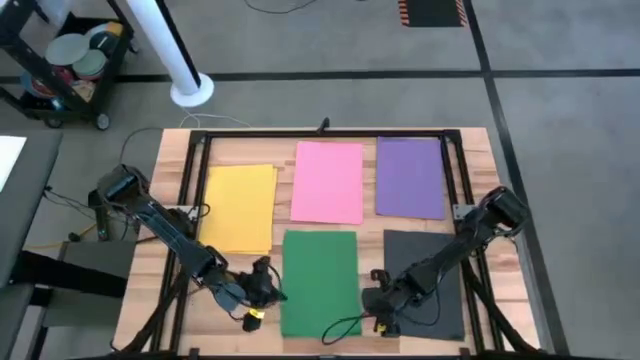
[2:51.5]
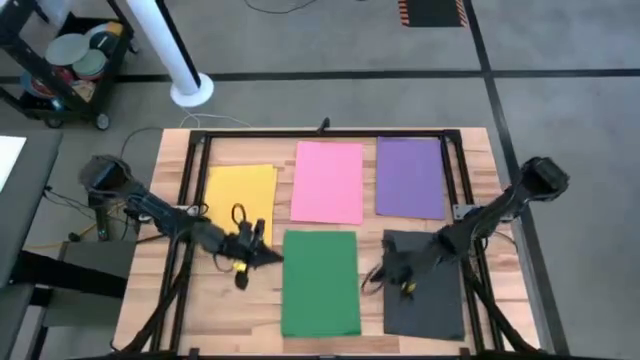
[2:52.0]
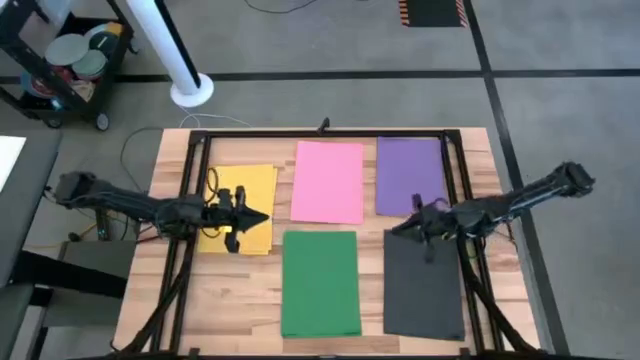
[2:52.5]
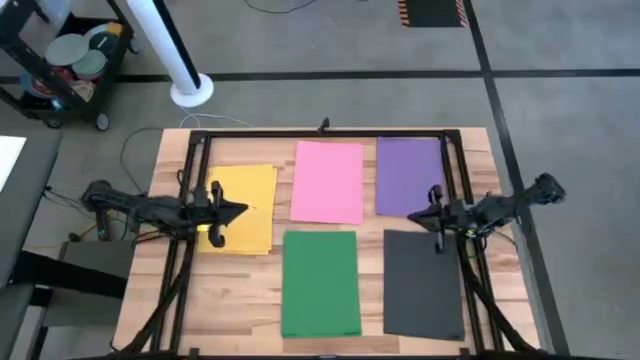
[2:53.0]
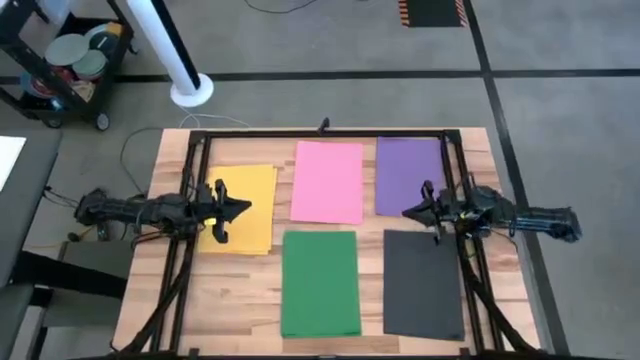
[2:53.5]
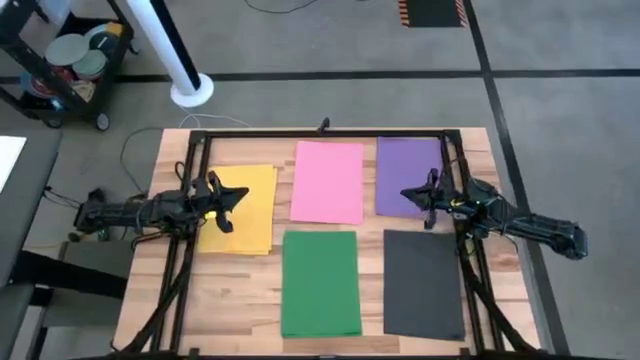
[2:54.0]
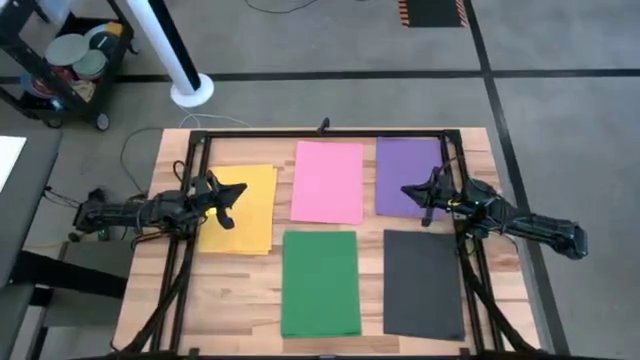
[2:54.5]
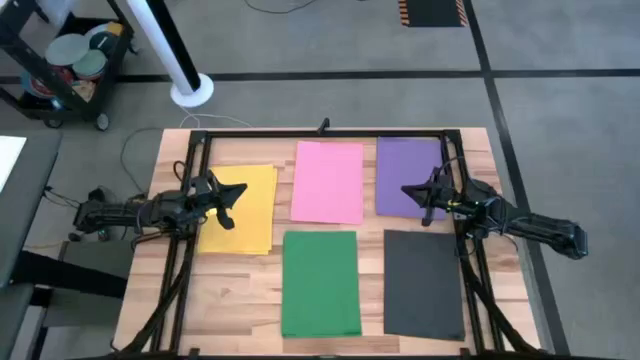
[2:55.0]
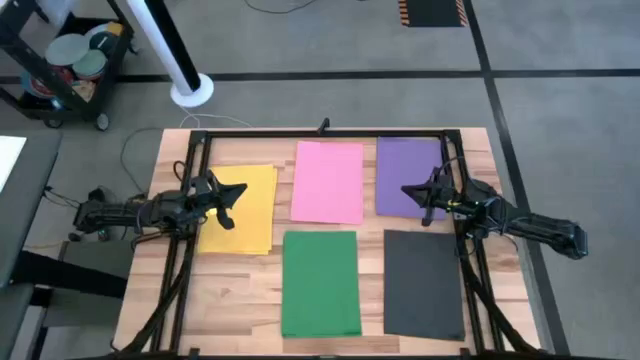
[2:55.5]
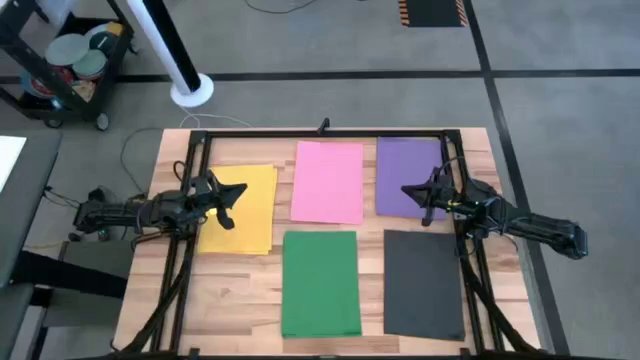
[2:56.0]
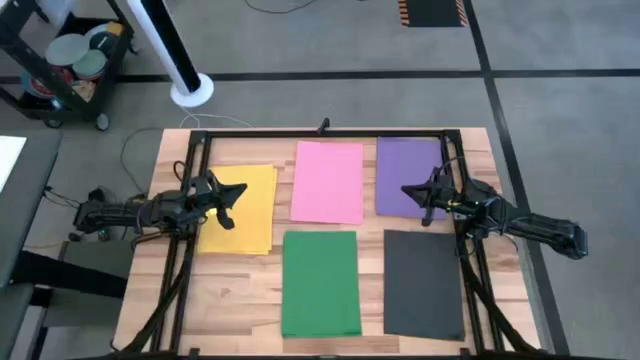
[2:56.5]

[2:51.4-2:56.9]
Task: Organize paper
Return to Home Position

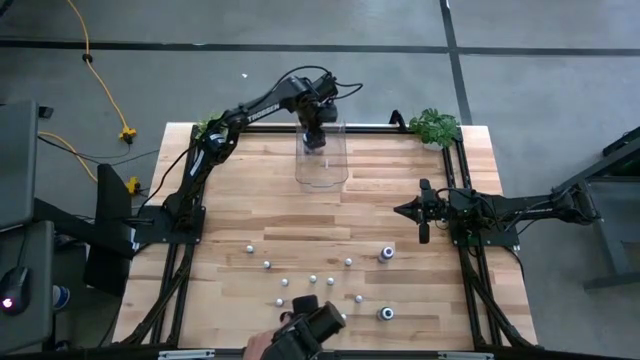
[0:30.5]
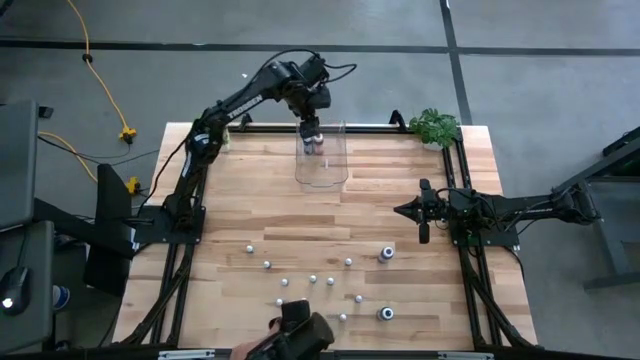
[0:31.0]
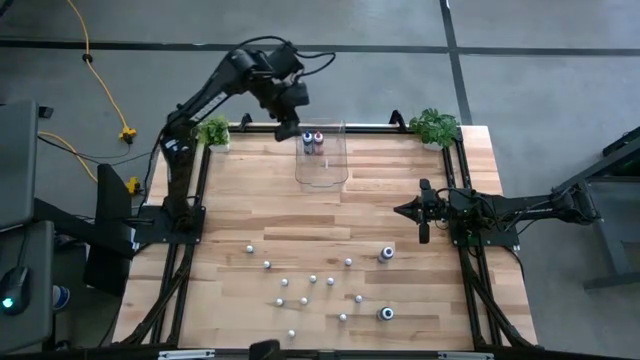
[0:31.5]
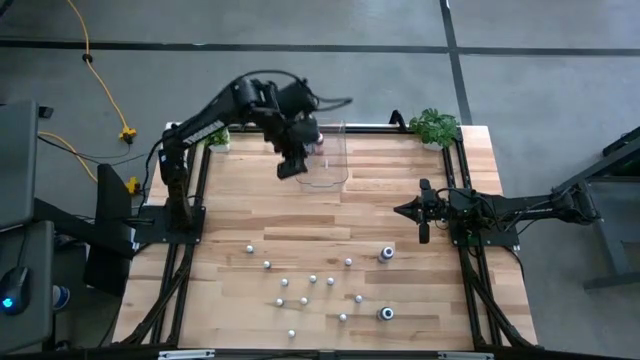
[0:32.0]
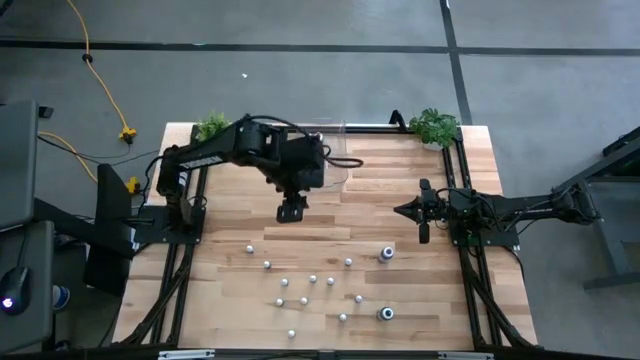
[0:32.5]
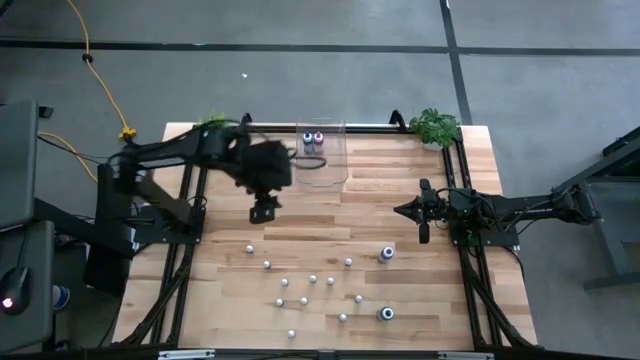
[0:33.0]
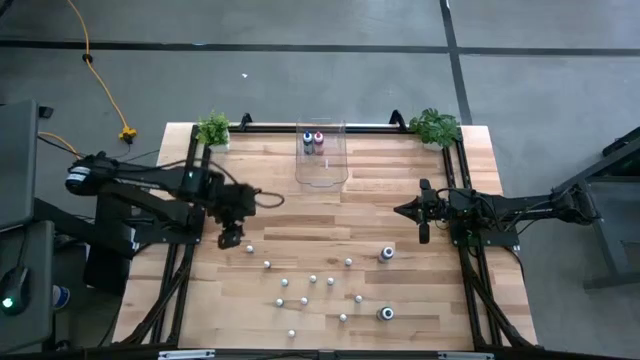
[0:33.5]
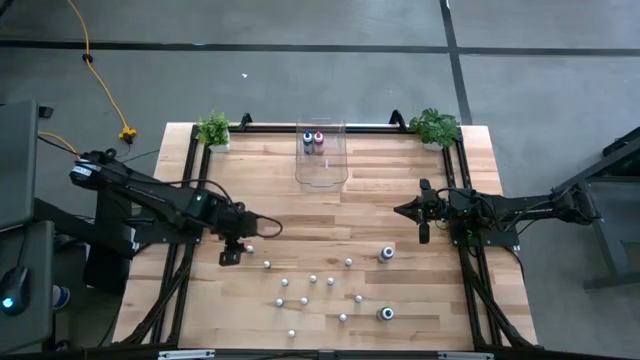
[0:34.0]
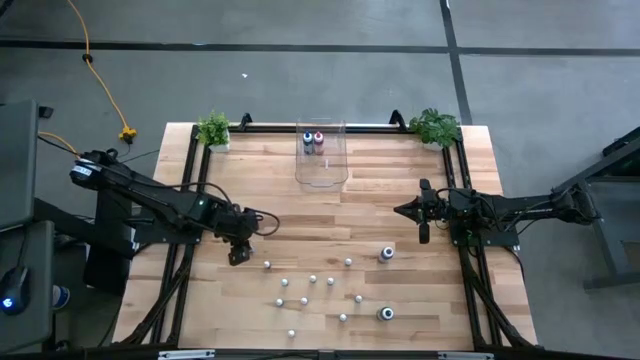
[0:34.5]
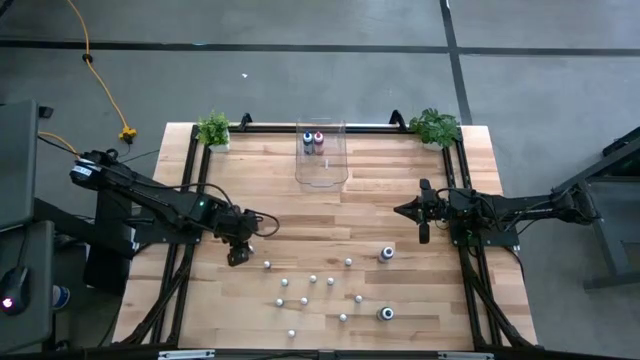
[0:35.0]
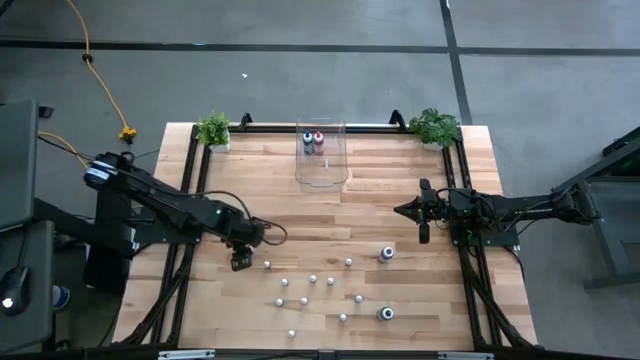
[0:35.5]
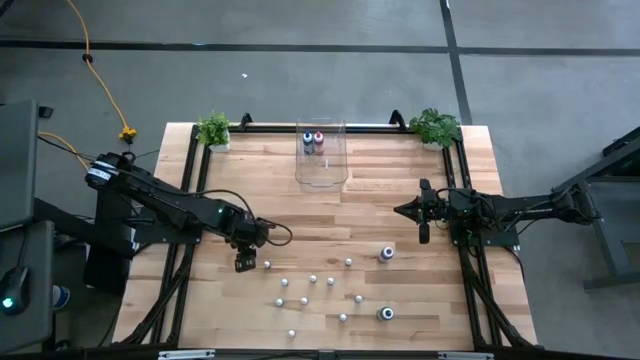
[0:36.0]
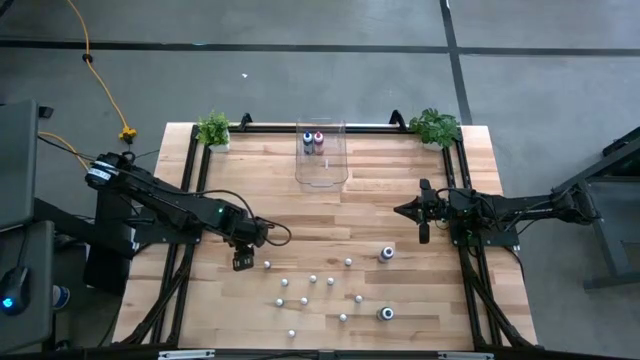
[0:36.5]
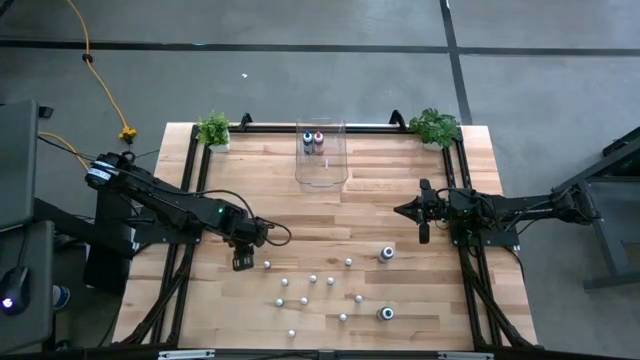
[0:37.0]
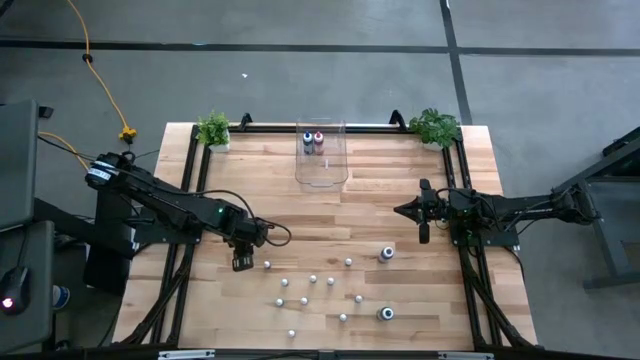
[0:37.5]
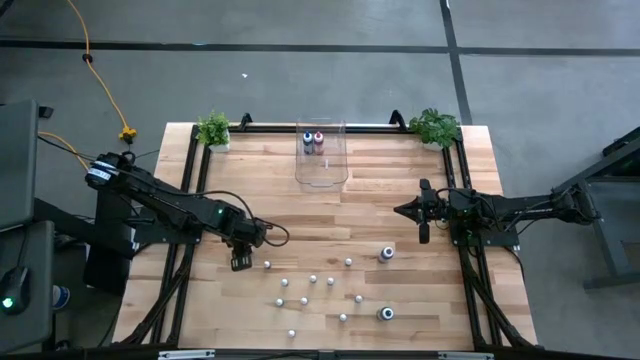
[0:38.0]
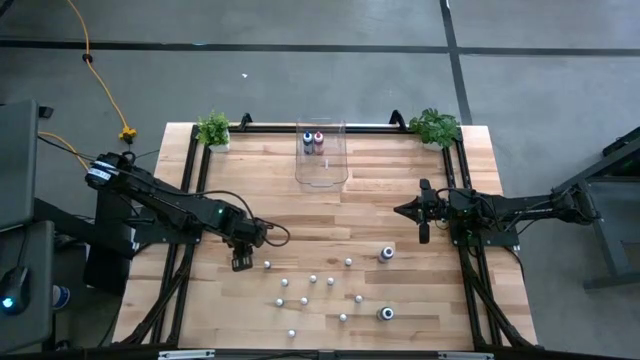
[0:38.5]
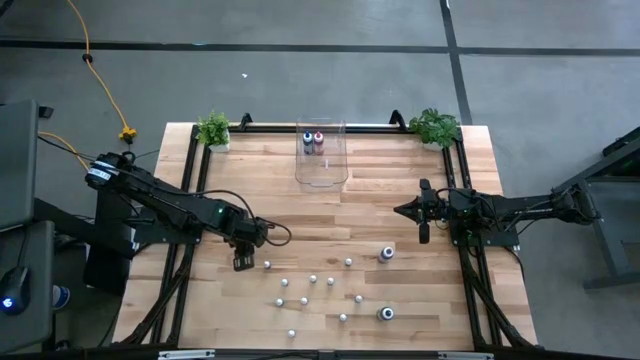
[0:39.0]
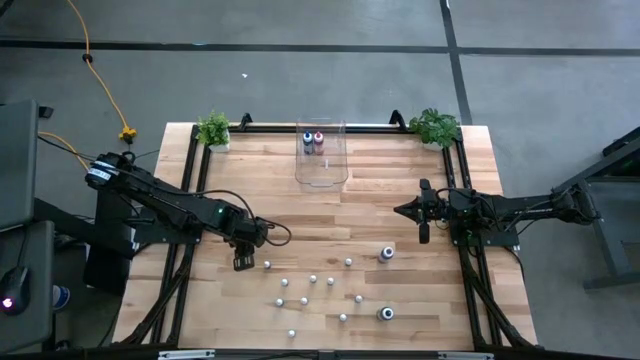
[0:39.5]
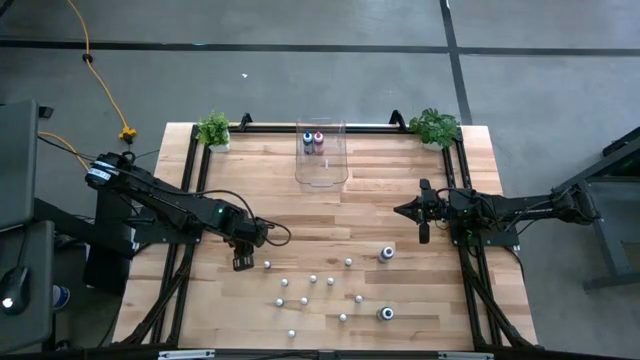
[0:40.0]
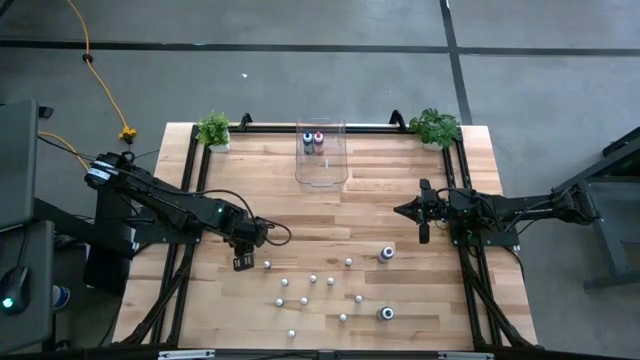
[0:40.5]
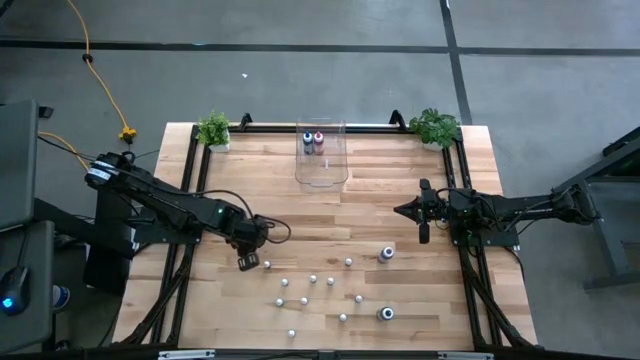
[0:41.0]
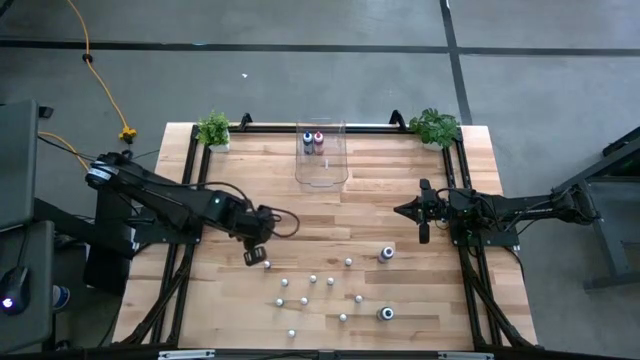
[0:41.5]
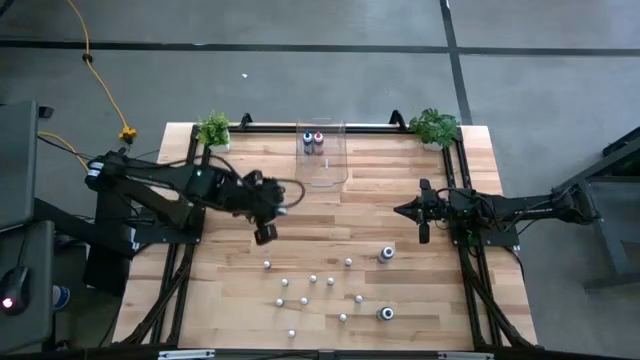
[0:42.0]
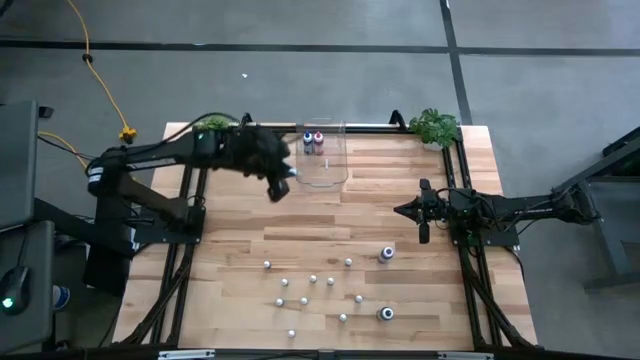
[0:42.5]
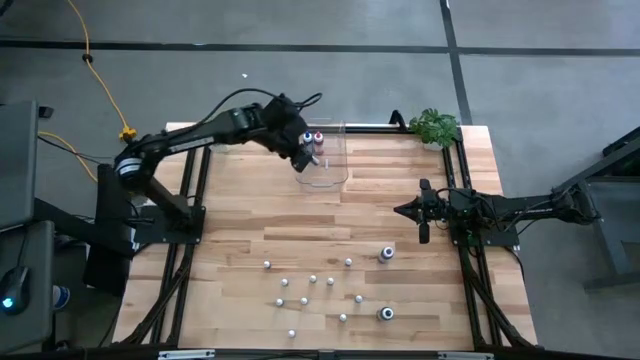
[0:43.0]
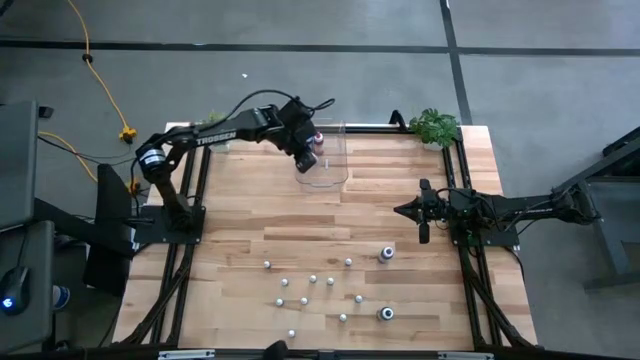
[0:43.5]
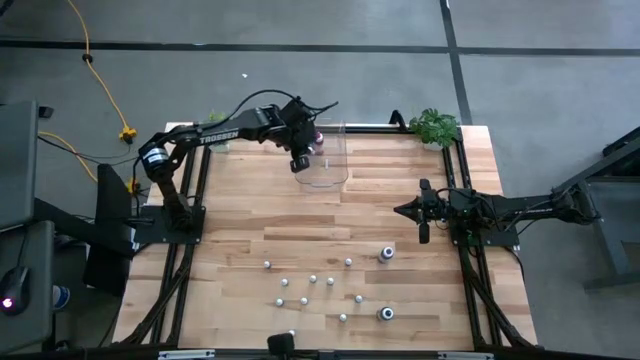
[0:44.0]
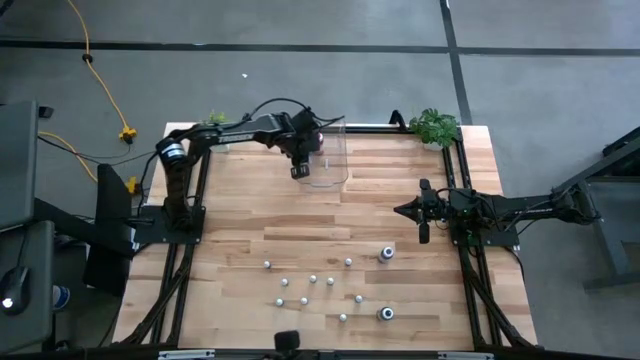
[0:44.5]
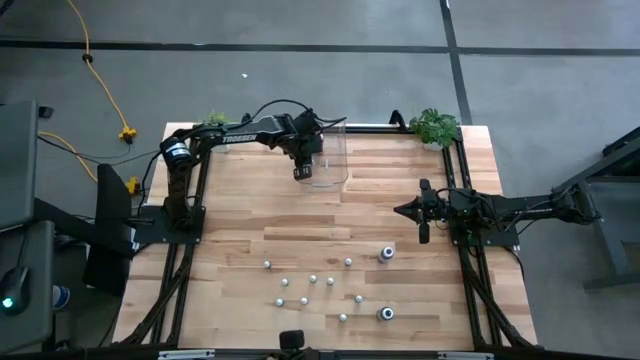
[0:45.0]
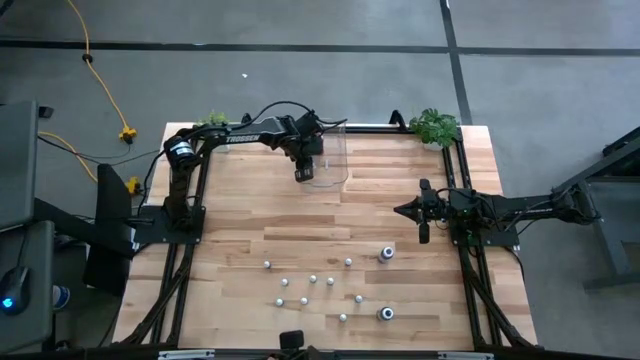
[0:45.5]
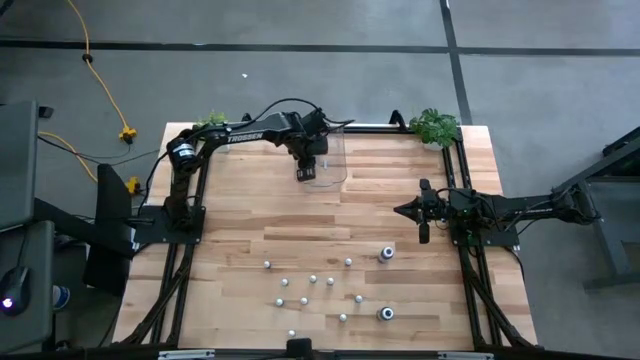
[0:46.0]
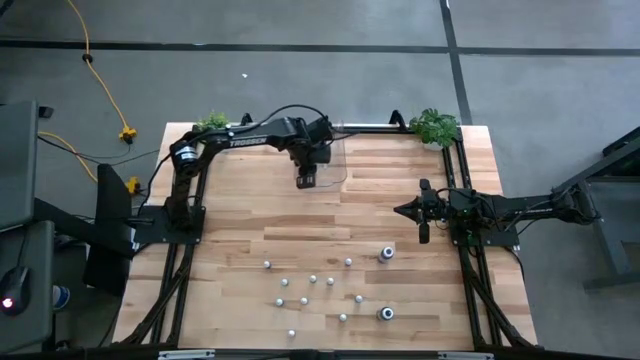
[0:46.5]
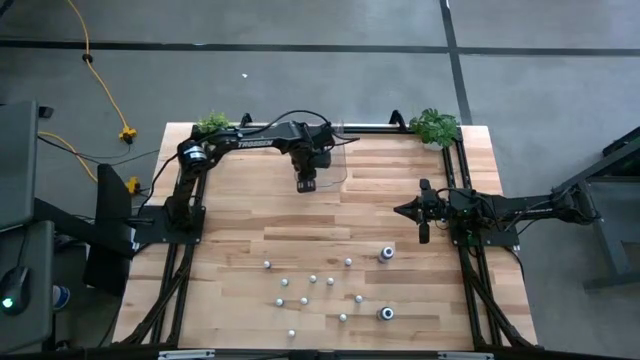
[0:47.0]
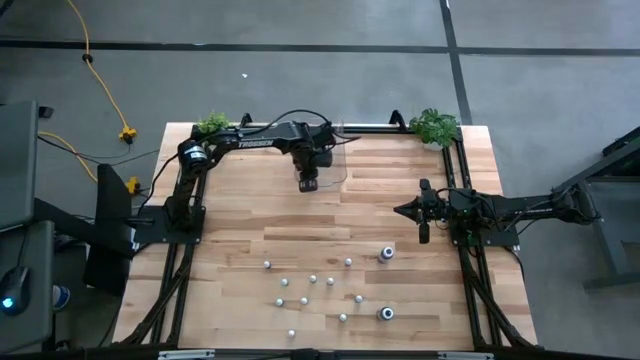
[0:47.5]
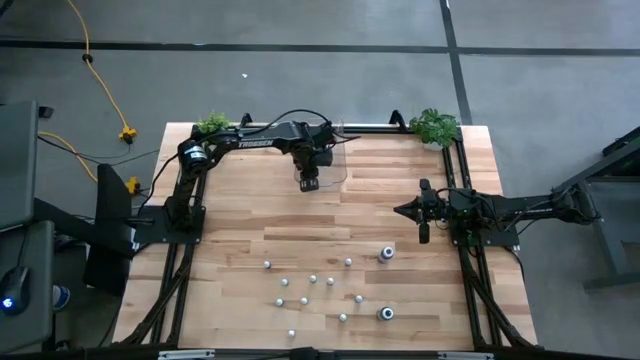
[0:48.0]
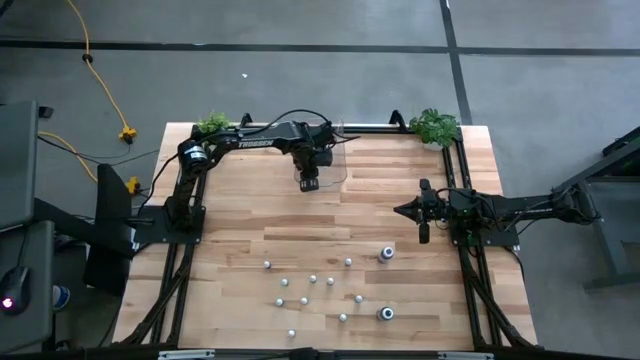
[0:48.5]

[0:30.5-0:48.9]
Task: Pick & Place food coloring
Put the small black food coloring into the transparent bin
